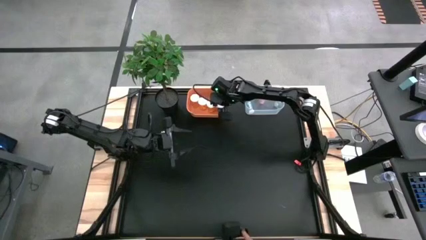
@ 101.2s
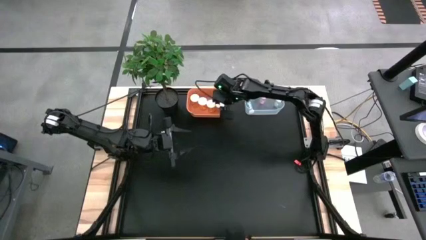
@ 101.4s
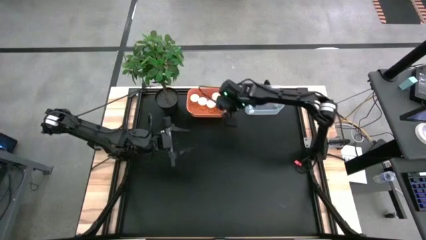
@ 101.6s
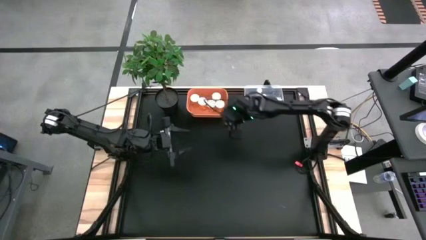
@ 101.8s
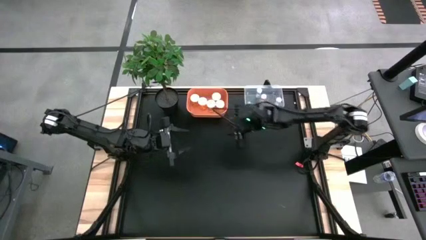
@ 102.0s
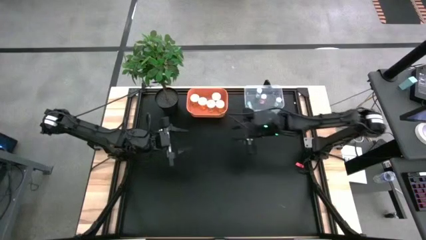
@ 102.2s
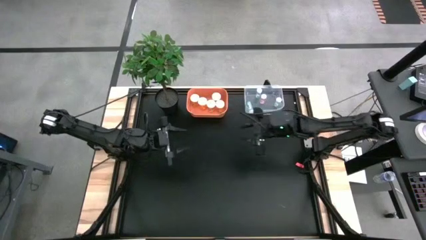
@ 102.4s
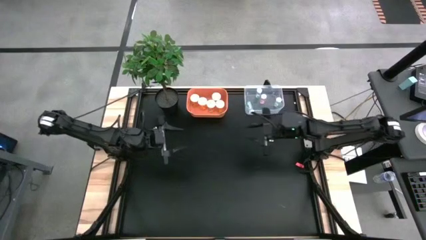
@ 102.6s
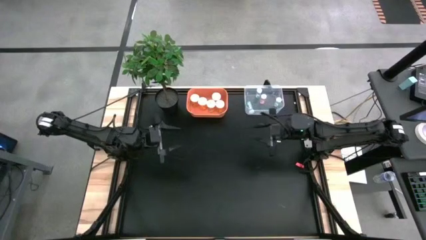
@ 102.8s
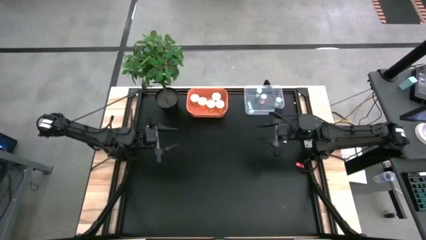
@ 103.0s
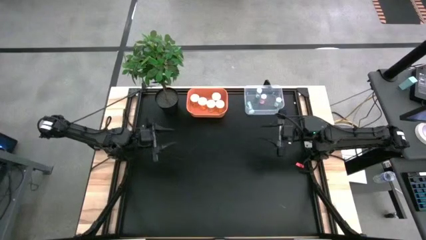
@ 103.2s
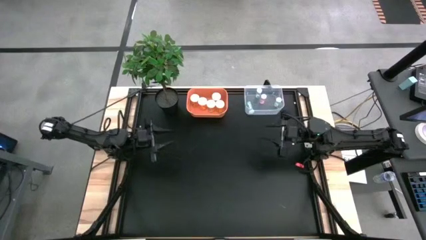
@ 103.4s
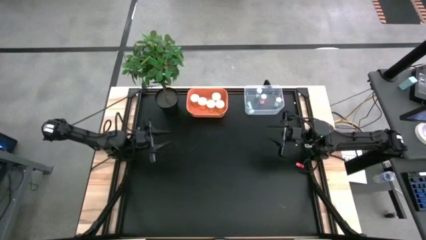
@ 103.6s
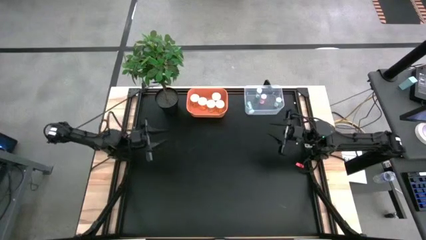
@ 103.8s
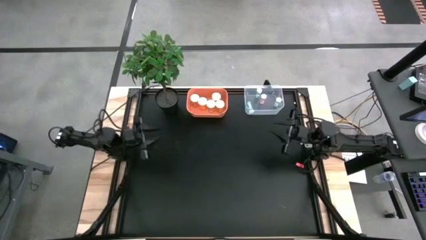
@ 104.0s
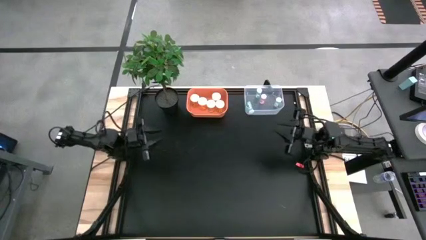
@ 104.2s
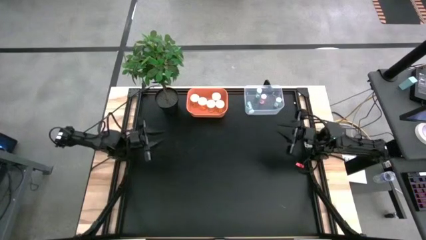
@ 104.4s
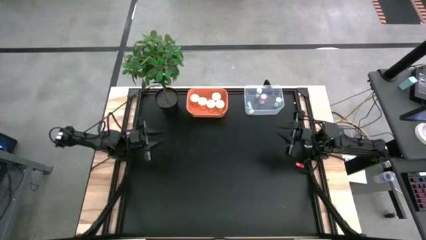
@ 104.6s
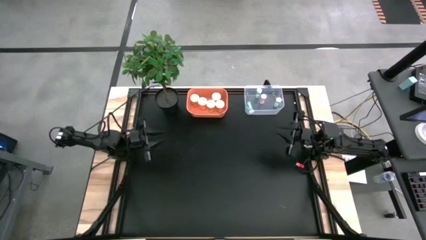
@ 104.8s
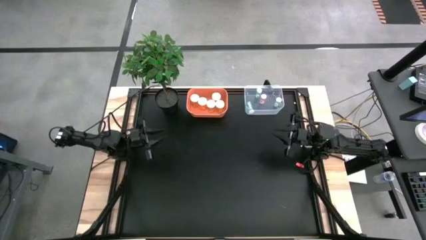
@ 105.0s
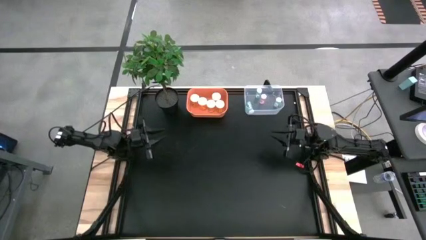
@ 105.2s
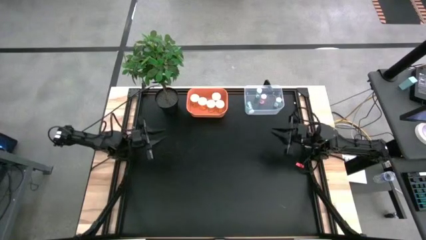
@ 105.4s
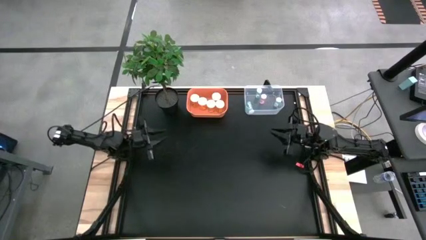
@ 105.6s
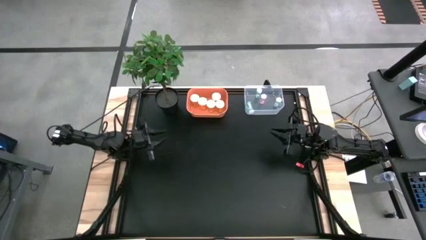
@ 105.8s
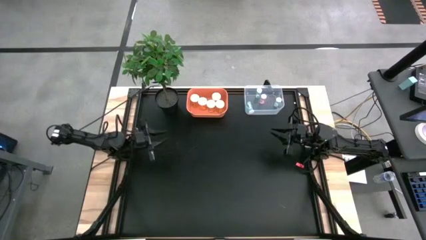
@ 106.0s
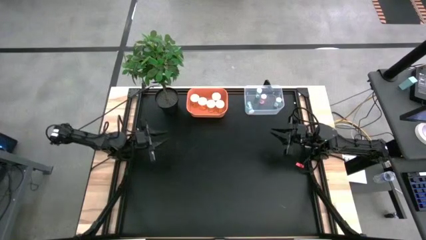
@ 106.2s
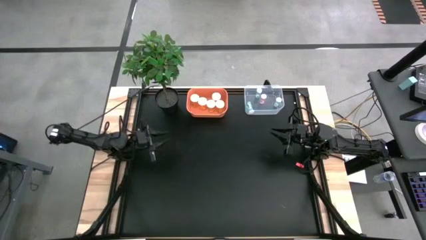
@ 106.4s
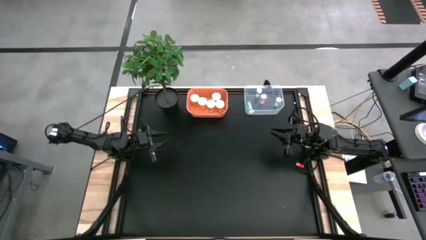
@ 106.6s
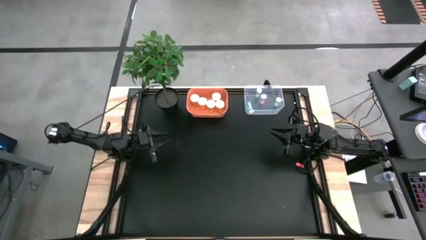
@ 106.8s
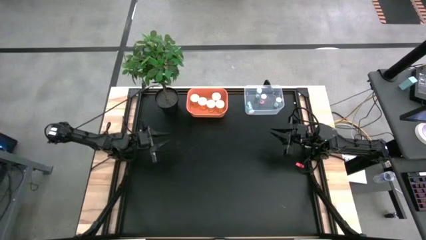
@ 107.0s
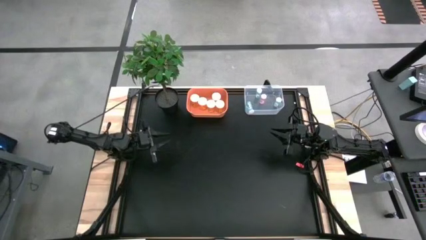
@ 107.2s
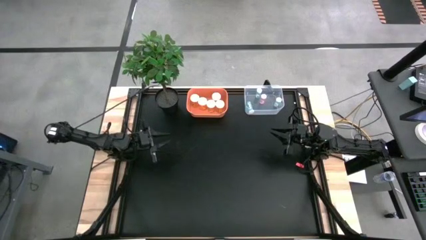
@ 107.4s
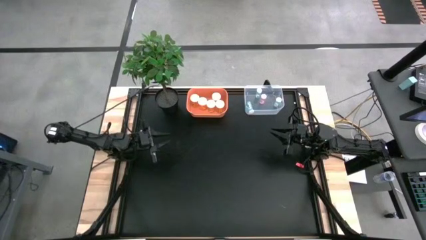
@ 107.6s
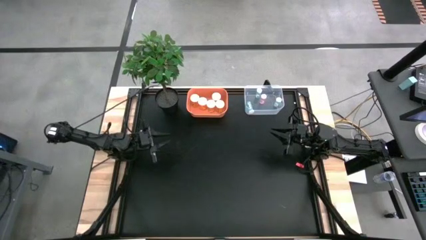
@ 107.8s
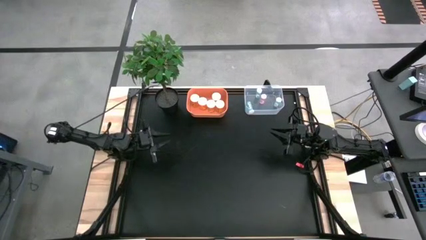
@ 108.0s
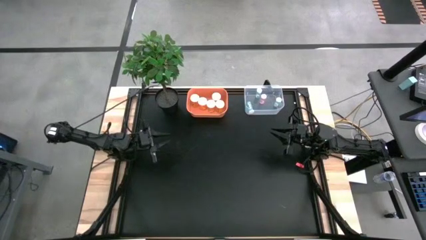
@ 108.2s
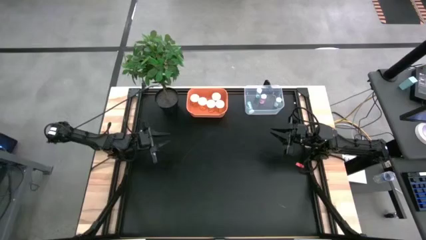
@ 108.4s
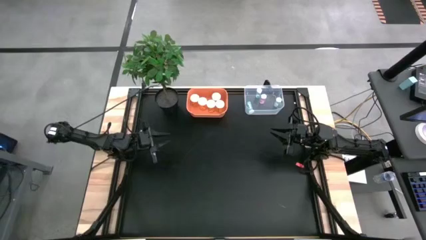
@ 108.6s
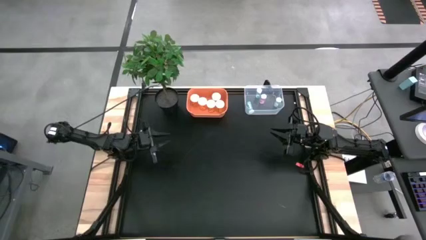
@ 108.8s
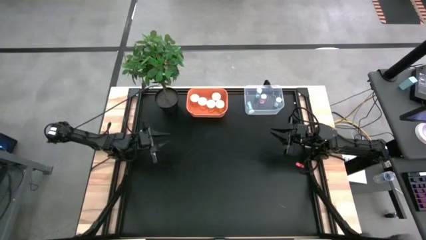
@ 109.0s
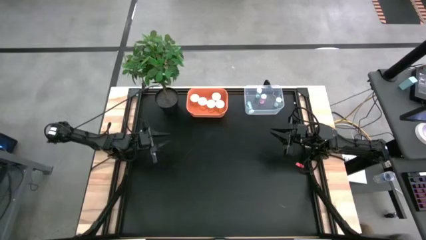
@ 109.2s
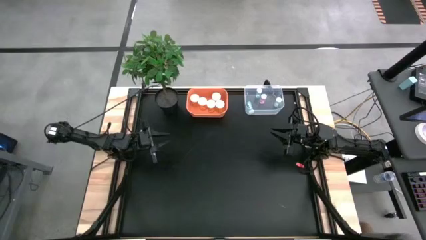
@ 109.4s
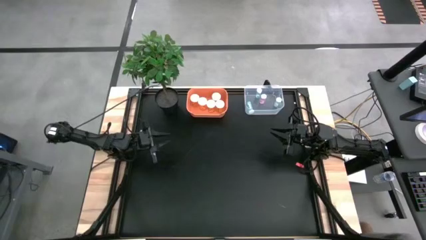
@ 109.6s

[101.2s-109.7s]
Task: Pick and place medicine bottles into bin by pill shape (circle, oval)
Return to Home Position

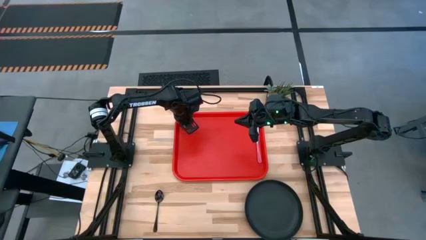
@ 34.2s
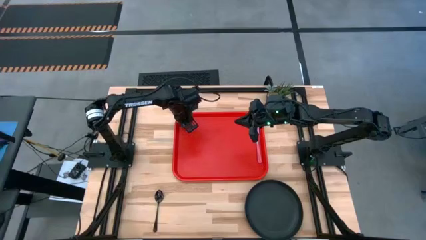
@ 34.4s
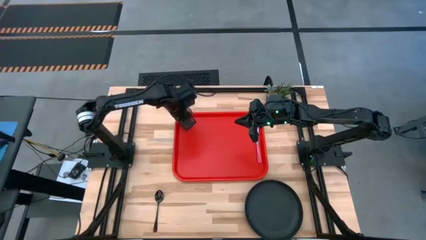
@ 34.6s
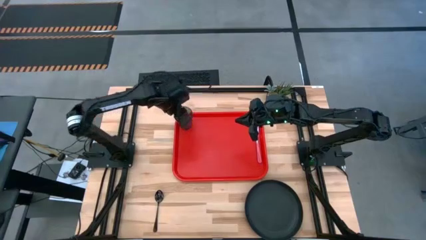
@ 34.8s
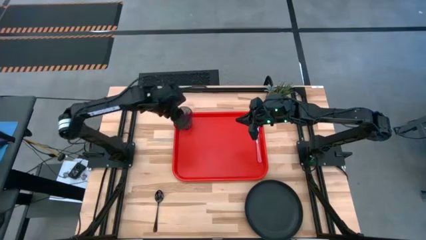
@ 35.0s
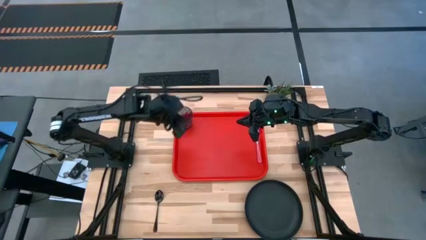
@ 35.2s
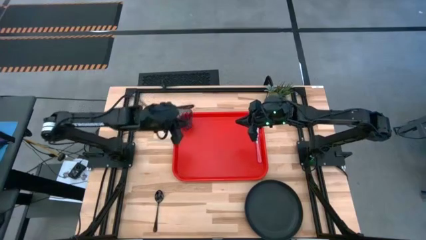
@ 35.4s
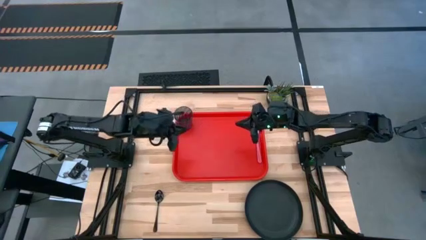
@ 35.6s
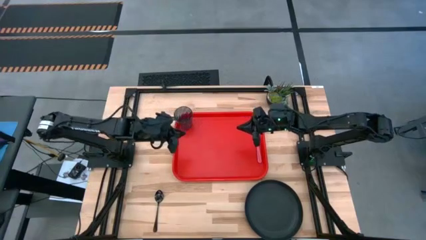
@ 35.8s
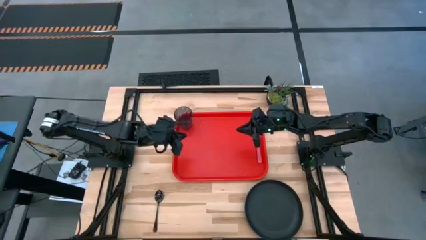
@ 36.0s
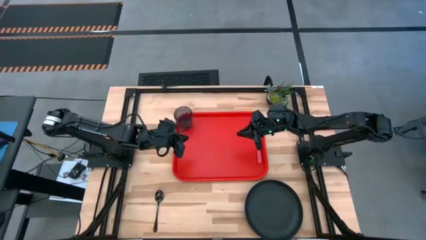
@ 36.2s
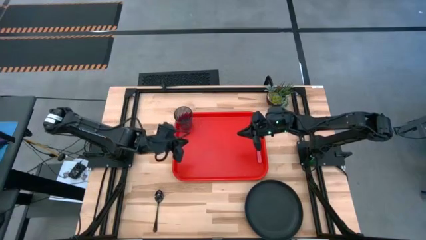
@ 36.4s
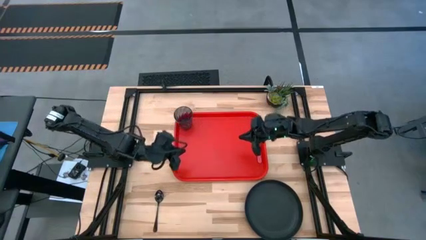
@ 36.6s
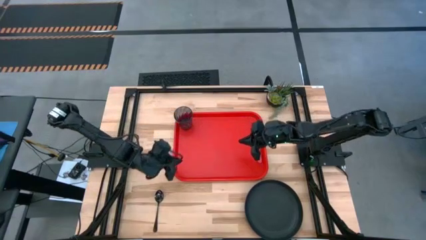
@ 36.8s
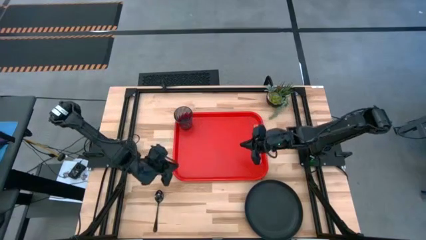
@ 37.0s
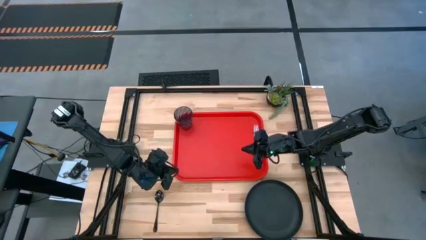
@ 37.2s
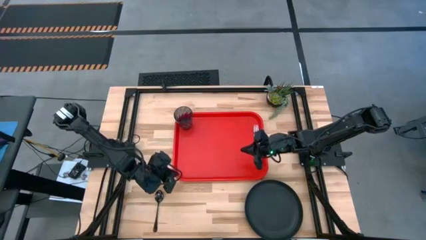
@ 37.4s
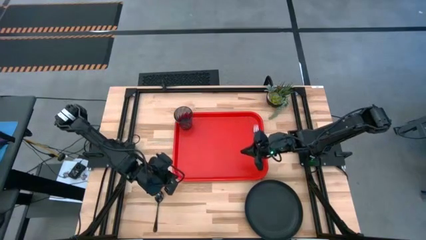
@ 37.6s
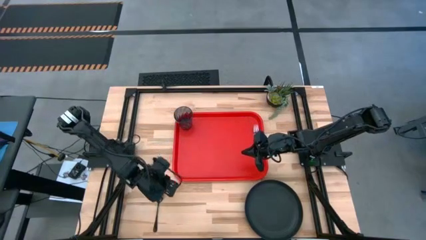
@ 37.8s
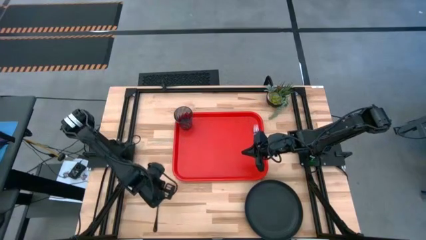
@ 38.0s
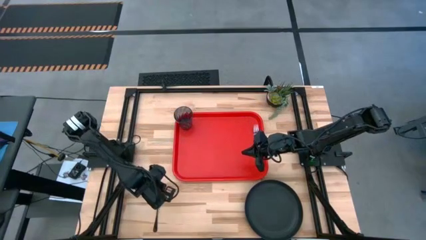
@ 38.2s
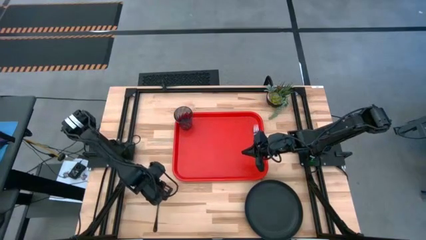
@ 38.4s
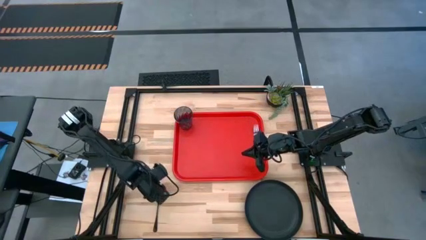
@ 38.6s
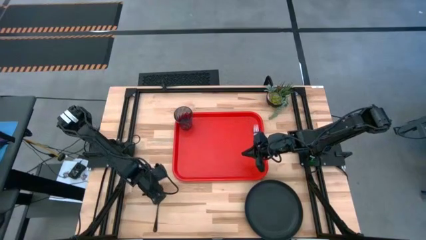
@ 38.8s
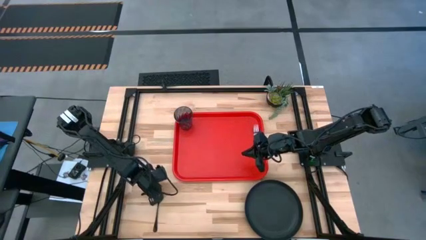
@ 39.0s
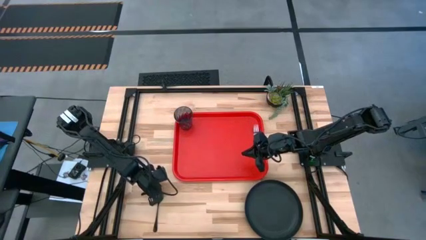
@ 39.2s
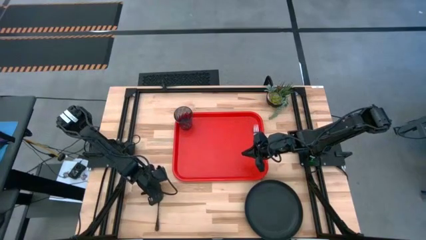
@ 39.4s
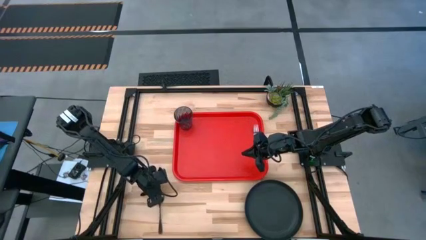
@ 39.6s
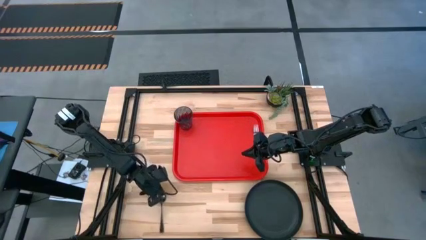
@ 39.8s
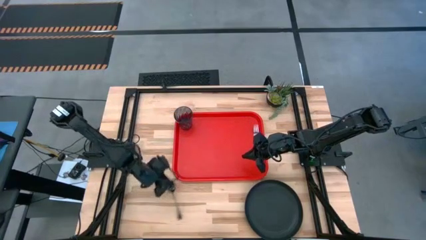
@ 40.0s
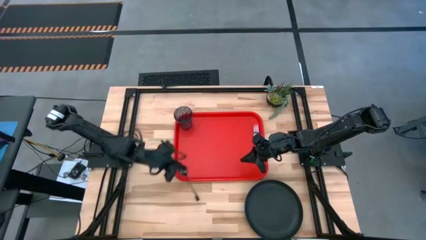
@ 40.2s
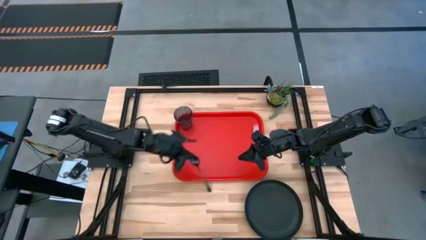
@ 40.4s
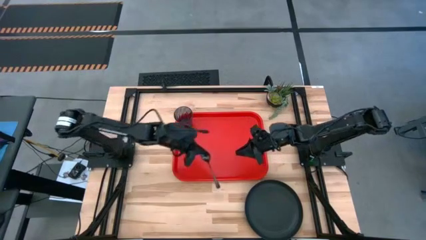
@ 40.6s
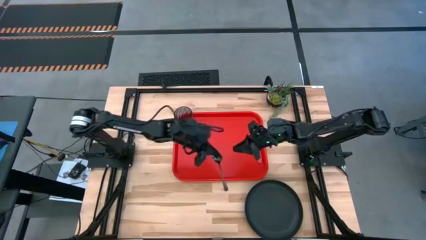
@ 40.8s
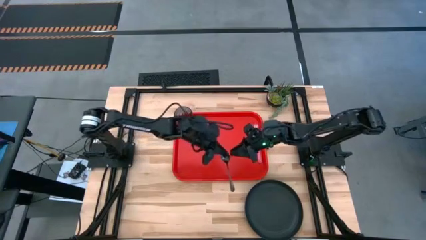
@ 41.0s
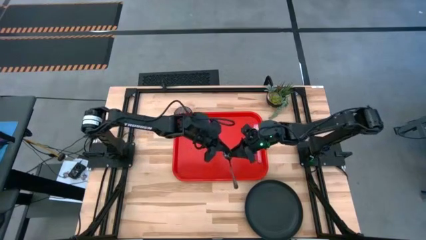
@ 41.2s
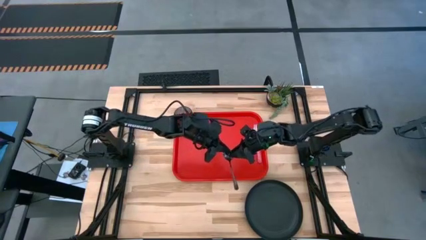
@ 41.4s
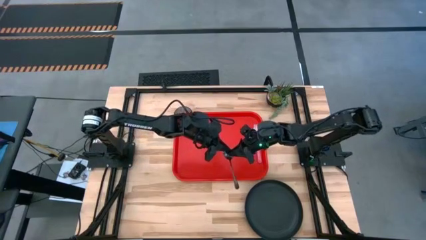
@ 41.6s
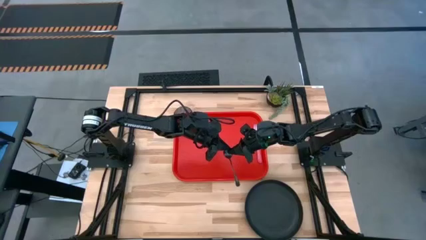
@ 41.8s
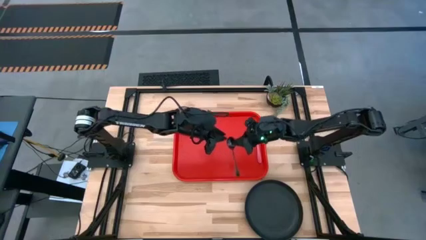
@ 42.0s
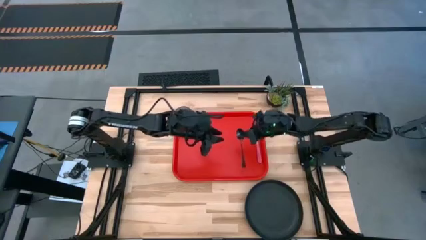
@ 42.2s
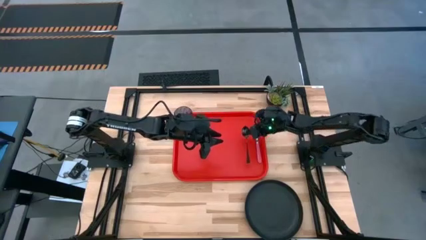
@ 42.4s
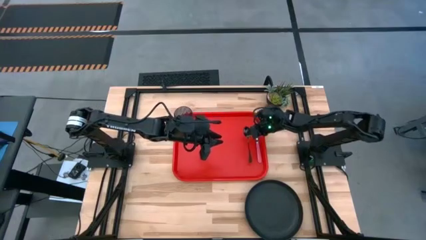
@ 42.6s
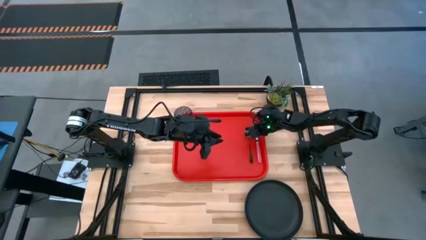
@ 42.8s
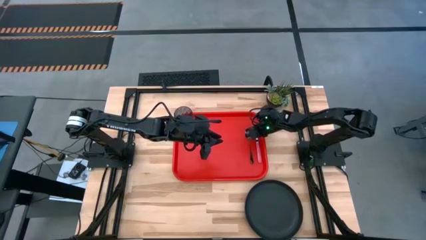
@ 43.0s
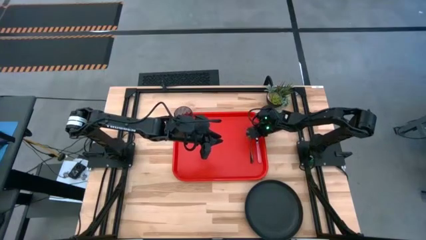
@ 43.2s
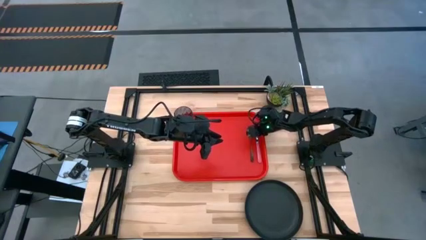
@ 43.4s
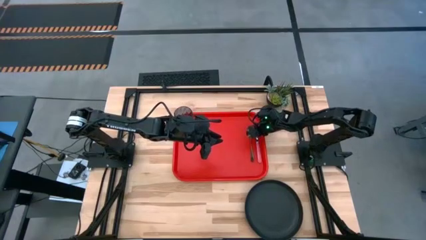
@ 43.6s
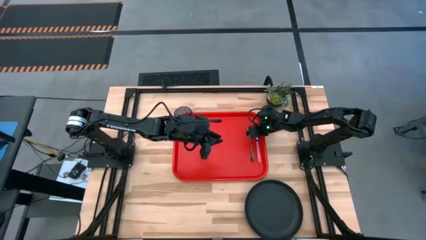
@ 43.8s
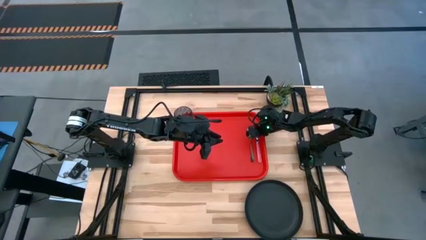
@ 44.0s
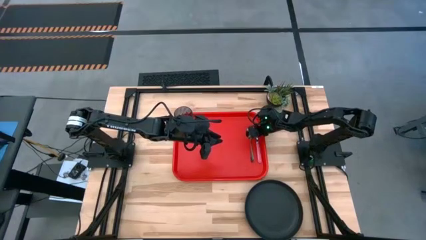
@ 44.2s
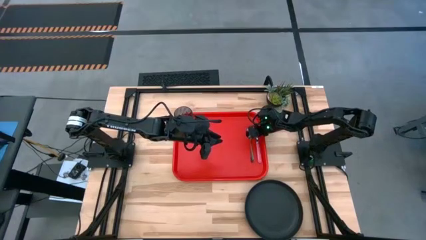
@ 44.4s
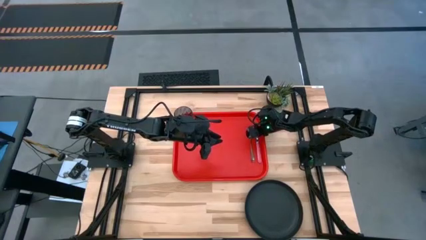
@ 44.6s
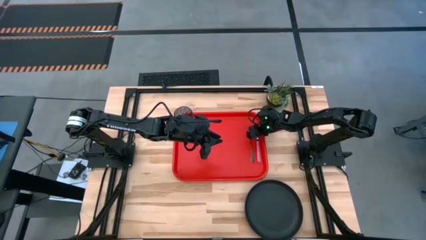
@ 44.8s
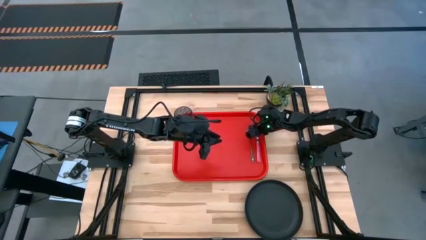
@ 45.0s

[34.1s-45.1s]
Task: Pick and place plate/cup/fork/spoon on tray
Put the black spoon to the left of the pink fork on the red tray
